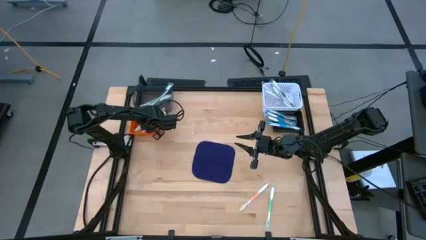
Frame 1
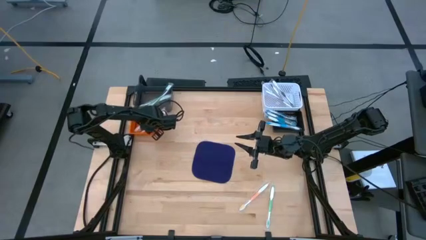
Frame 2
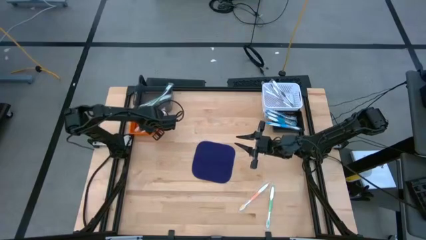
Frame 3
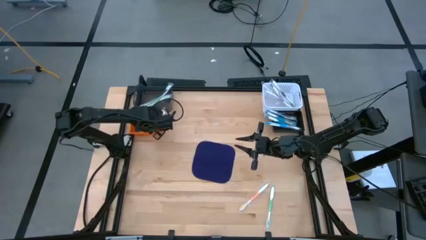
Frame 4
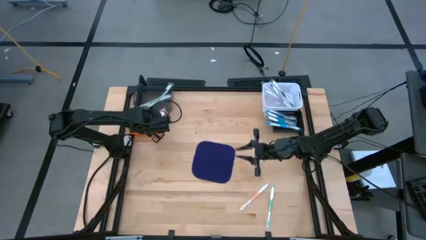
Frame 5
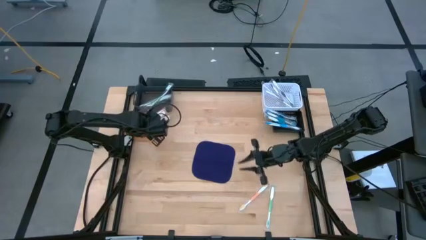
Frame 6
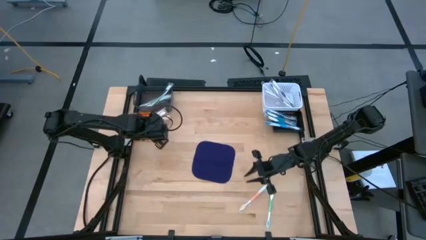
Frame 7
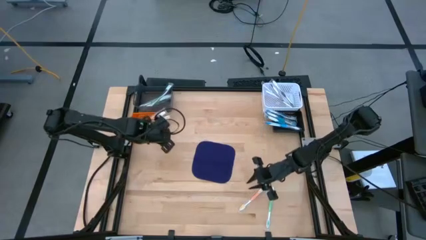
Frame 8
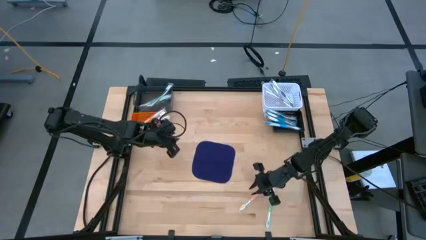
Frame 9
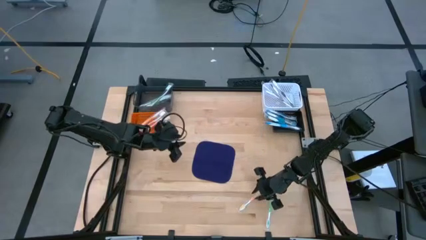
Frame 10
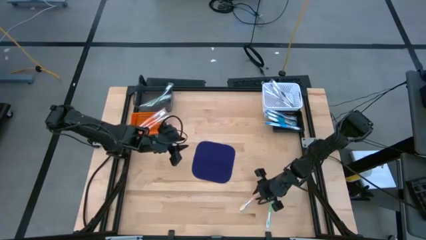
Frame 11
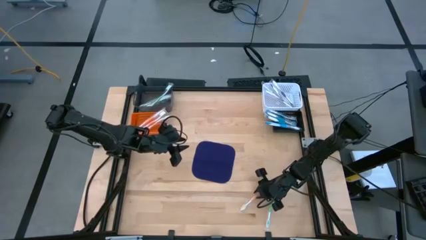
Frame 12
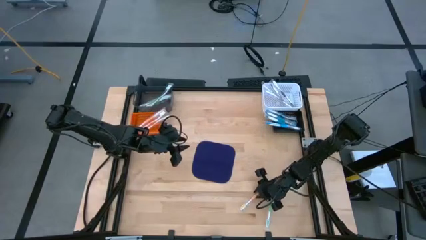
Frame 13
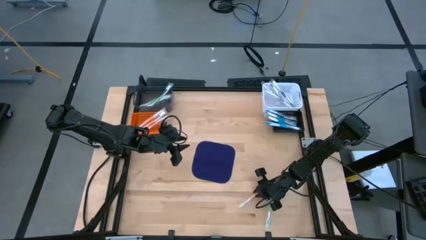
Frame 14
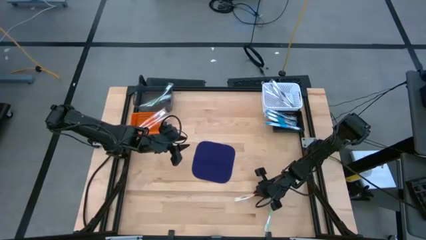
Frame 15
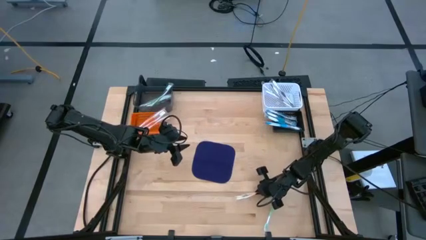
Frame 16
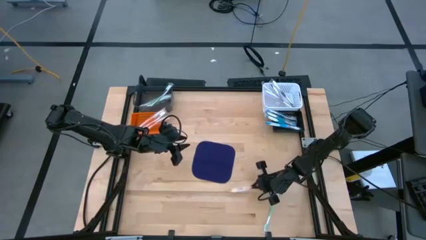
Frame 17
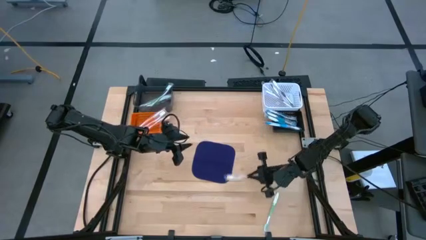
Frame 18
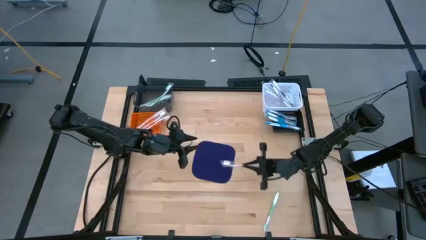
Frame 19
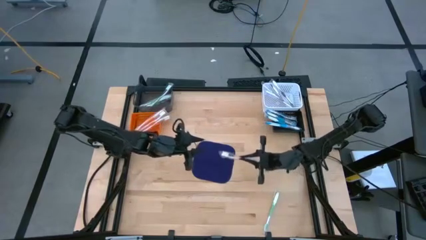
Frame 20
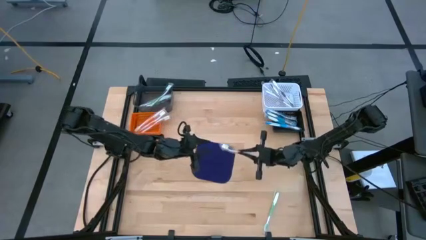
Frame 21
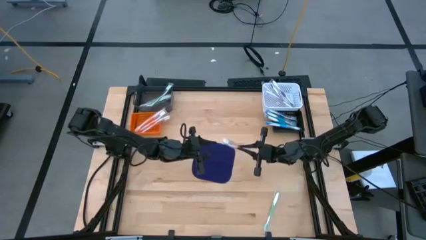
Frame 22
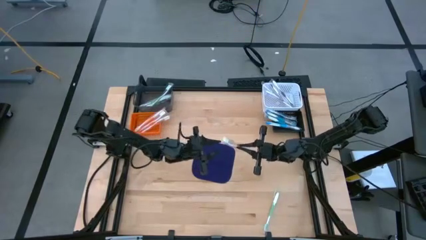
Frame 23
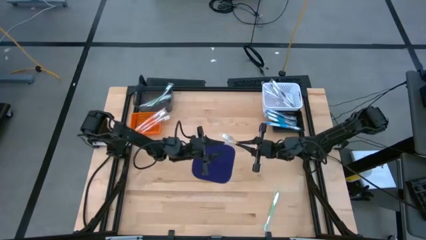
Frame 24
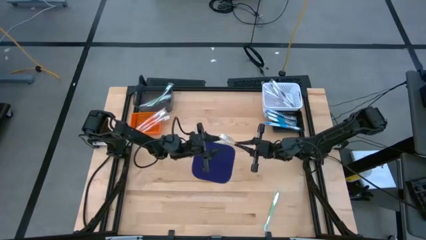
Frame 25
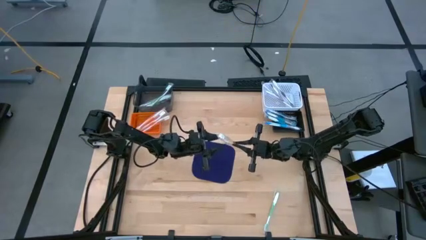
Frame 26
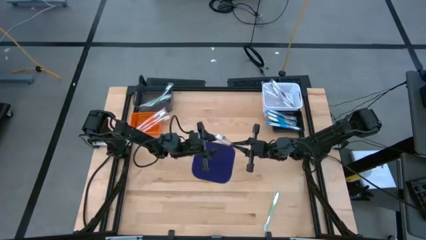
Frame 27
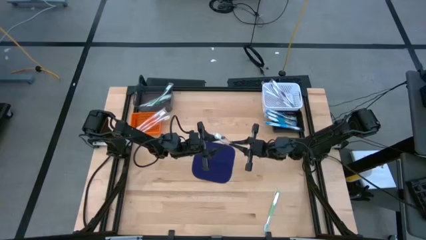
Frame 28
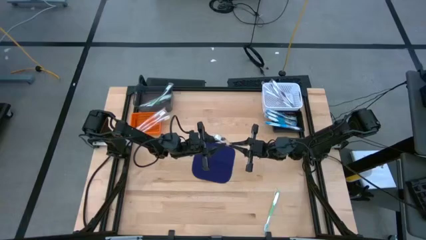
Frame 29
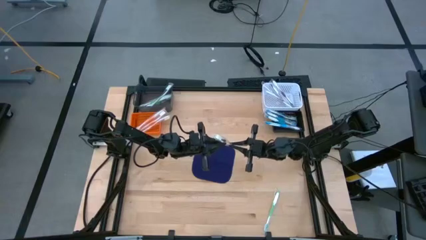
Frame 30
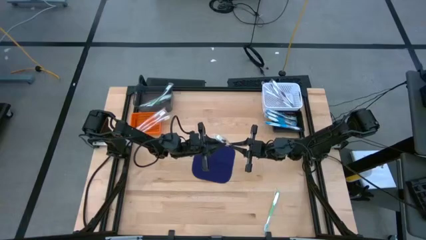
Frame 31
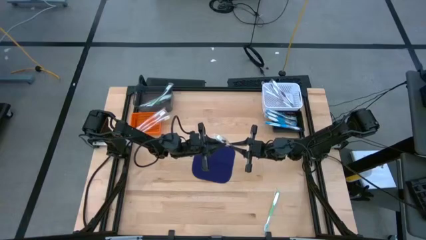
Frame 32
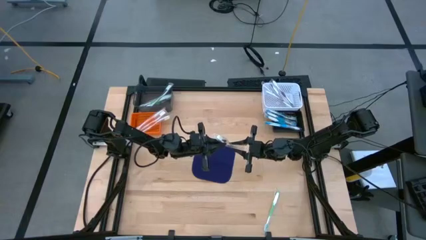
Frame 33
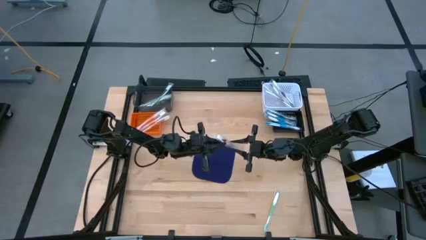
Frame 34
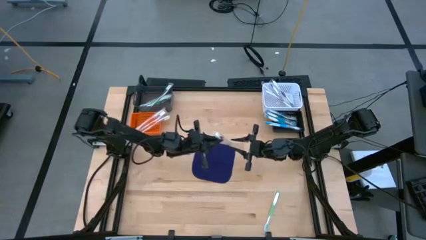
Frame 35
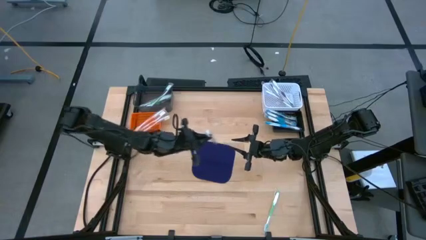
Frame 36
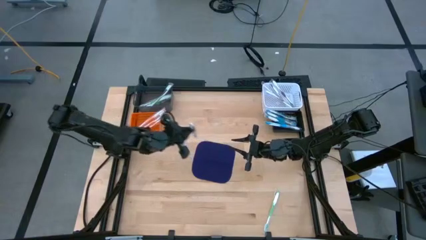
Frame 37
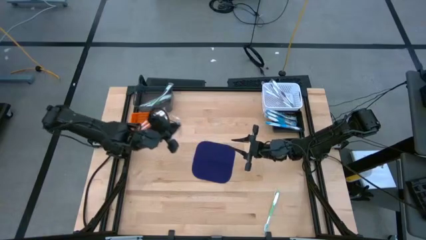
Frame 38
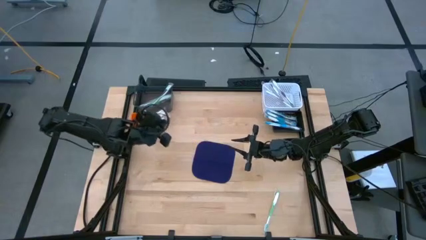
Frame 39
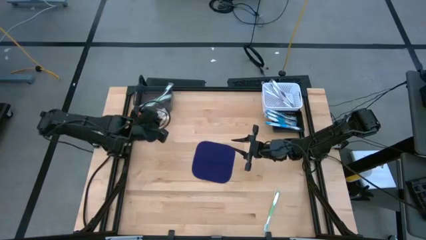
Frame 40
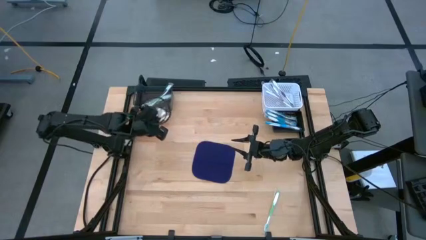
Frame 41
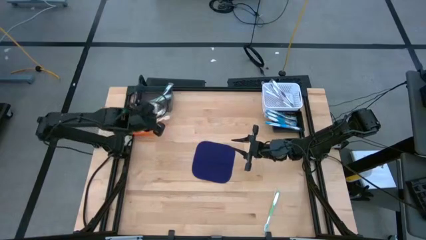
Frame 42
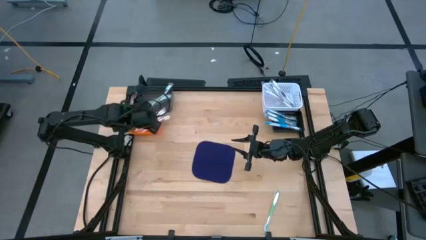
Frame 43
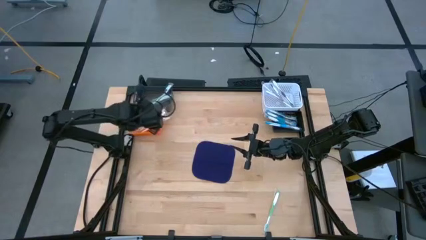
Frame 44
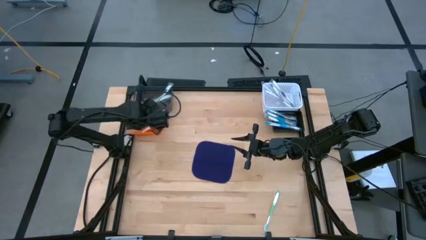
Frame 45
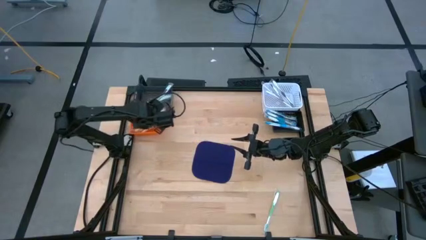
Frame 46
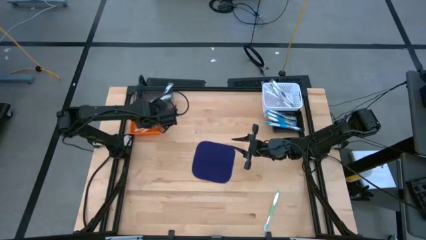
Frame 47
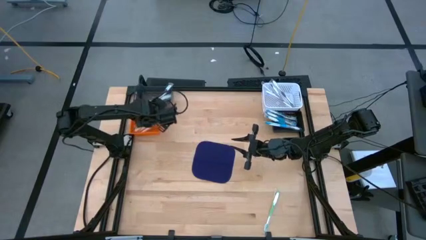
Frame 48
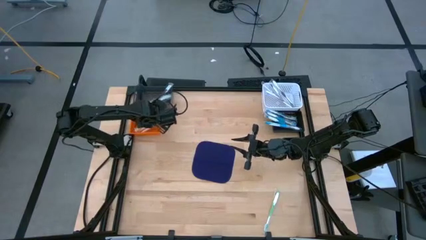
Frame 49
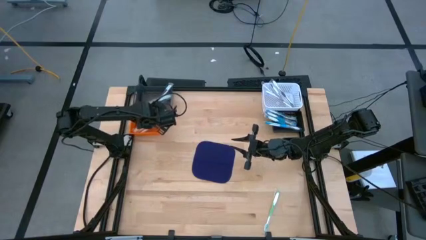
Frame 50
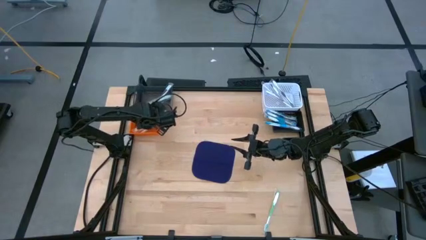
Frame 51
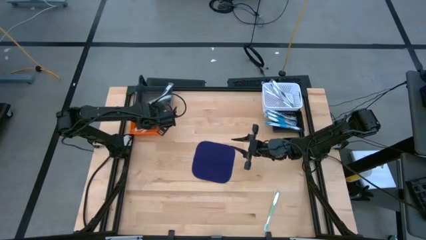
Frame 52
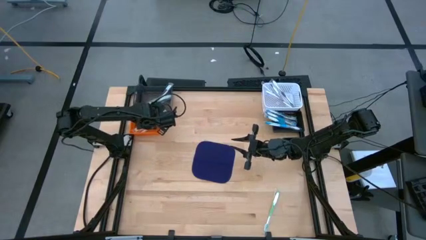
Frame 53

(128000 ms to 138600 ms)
Task: Pick & Place Toothbrushes
Put the orange toothbrush into the orange bin

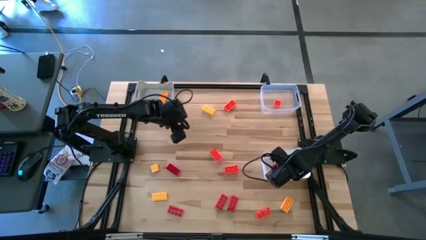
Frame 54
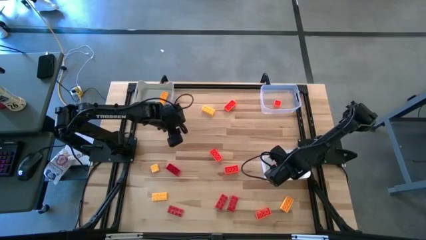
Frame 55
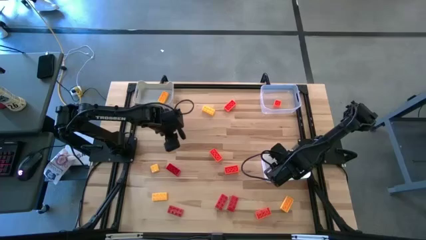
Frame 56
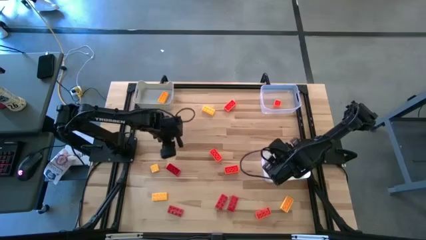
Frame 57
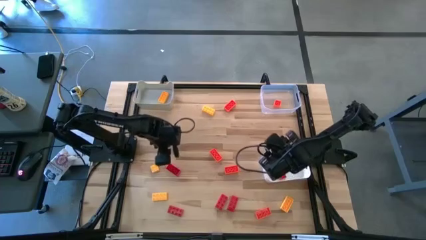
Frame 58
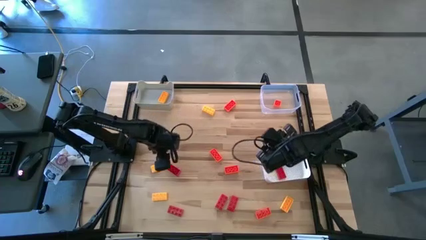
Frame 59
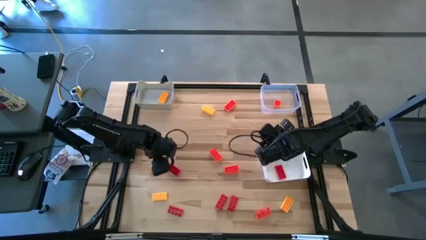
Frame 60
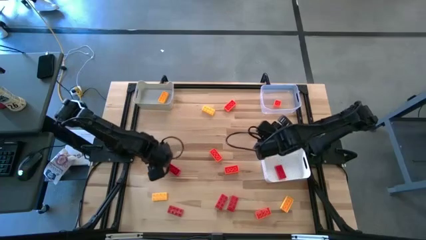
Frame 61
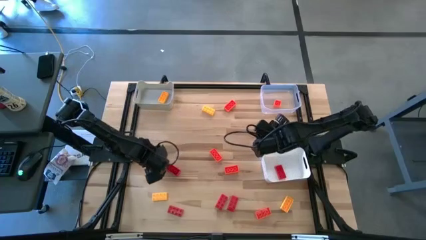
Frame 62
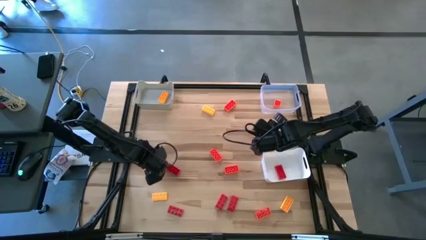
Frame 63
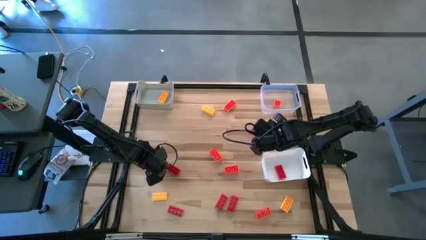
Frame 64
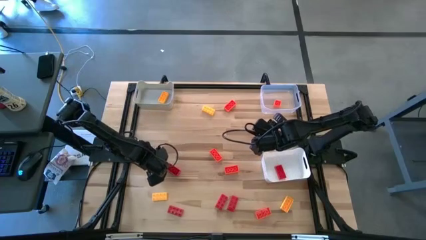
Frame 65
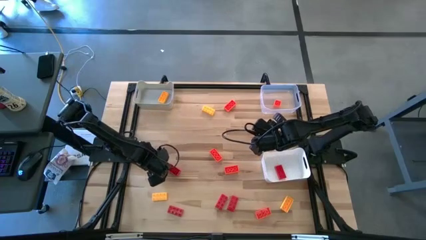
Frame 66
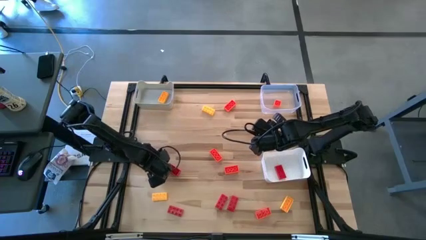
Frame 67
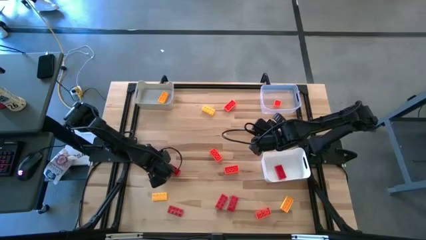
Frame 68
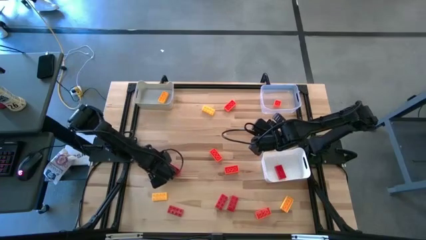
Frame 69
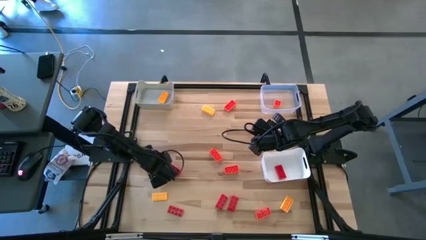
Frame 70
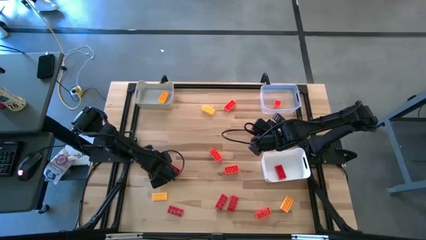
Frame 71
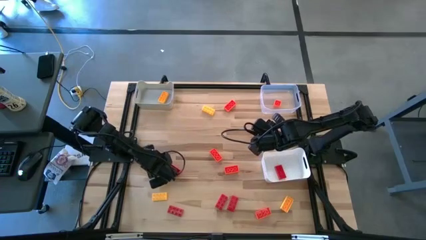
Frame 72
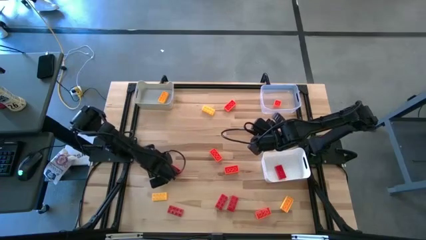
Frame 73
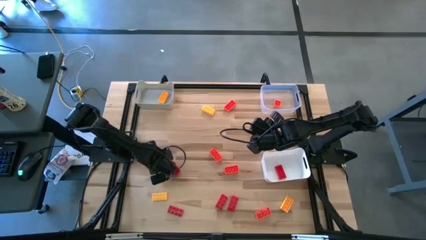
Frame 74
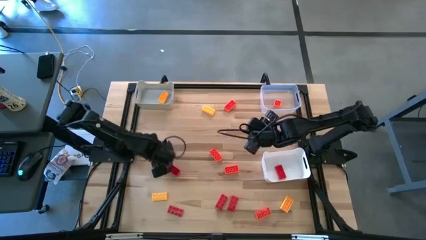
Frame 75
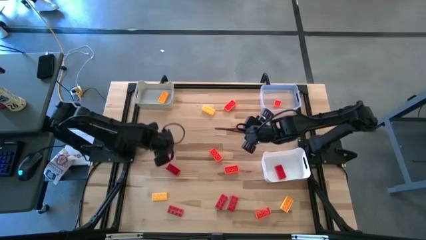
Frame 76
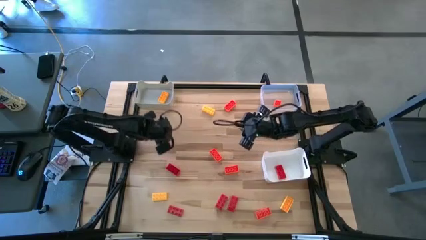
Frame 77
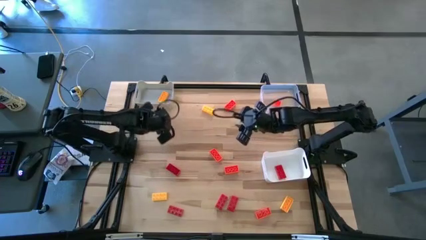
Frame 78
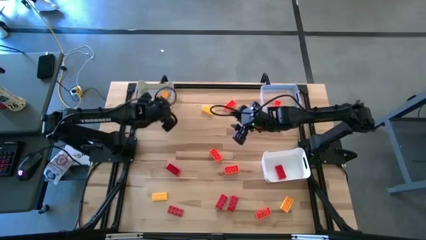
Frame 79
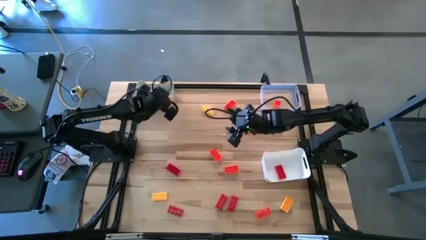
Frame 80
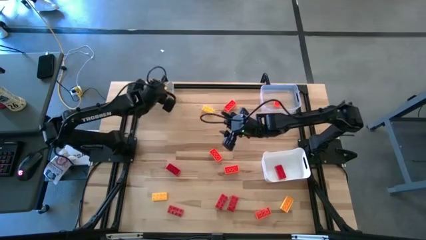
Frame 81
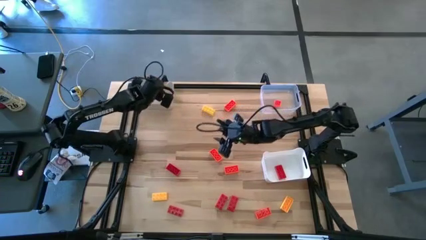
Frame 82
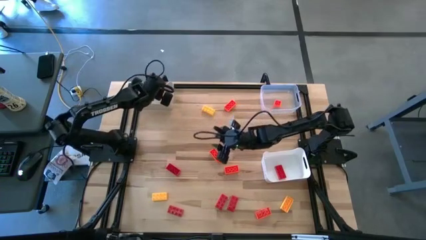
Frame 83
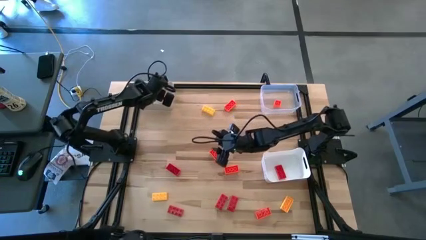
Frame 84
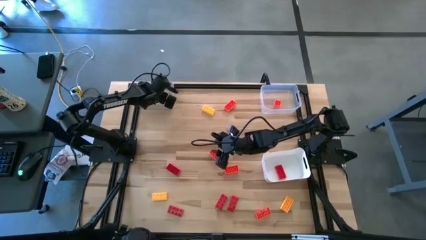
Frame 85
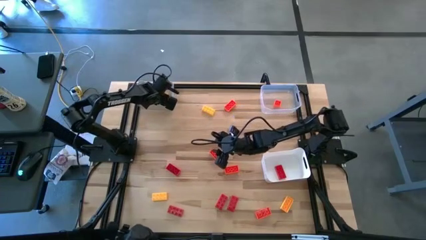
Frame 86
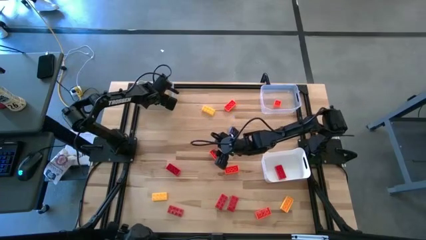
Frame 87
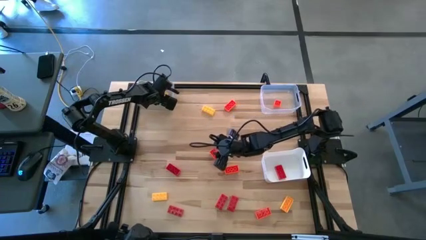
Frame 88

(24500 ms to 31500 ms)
Task: Sort & place blocks by color
Put the yellow block into the gray bin
